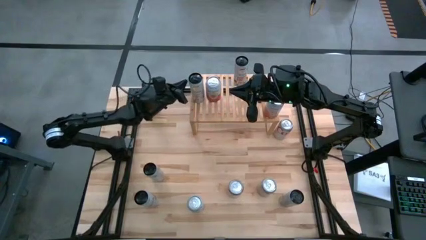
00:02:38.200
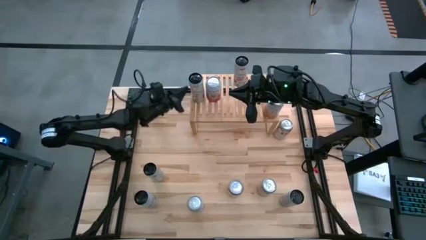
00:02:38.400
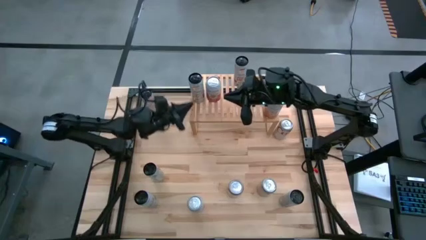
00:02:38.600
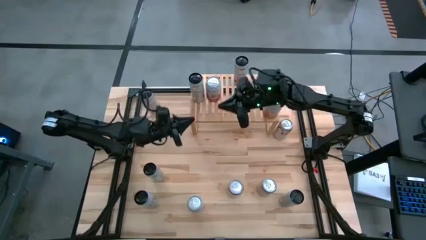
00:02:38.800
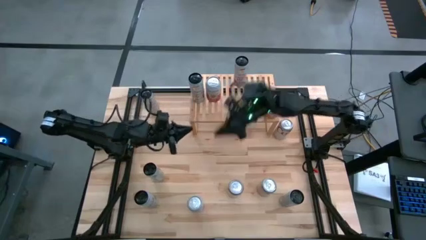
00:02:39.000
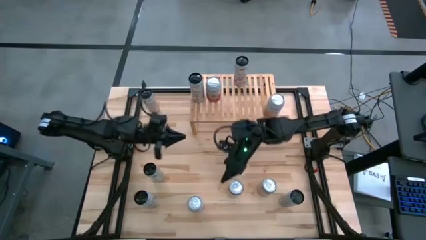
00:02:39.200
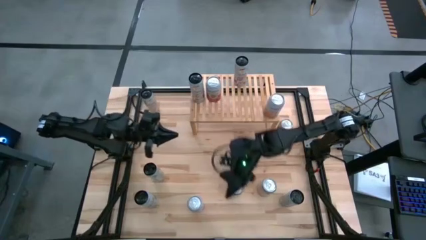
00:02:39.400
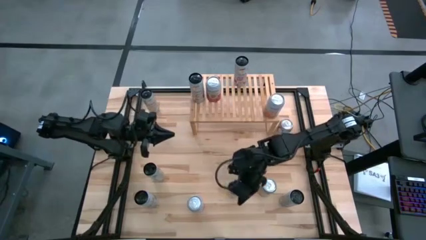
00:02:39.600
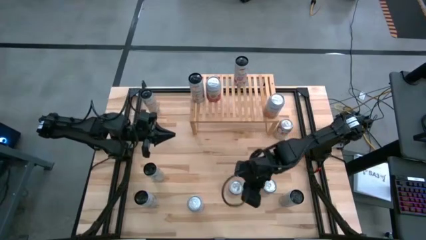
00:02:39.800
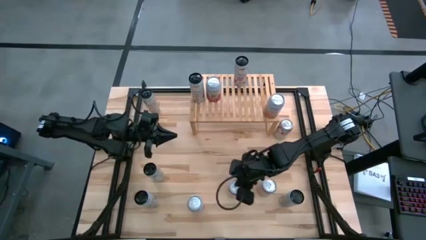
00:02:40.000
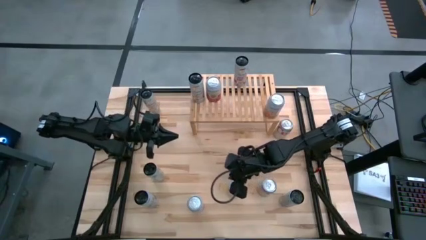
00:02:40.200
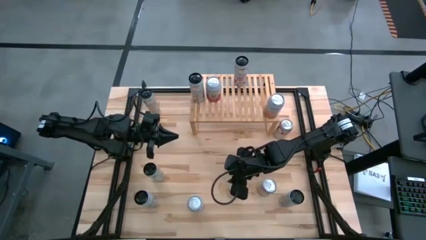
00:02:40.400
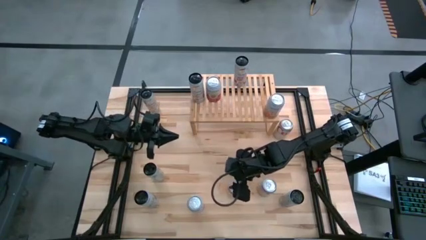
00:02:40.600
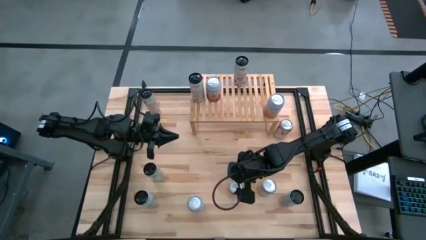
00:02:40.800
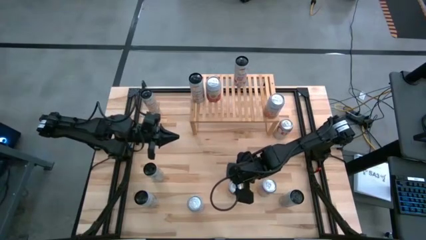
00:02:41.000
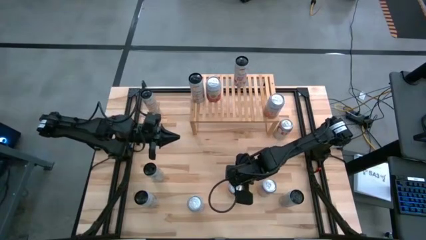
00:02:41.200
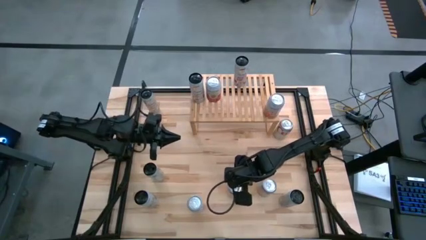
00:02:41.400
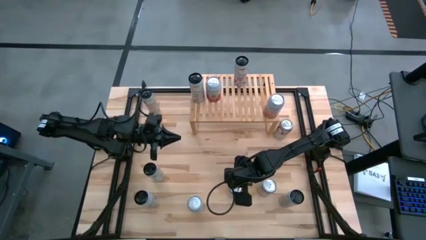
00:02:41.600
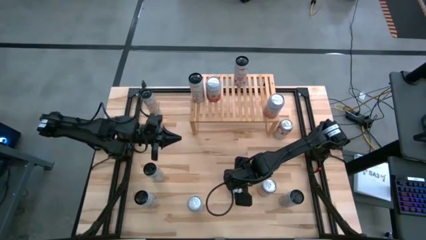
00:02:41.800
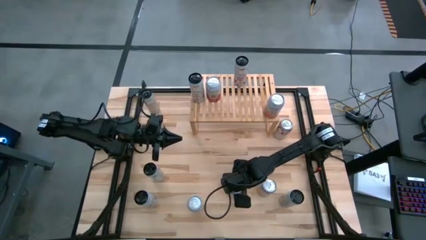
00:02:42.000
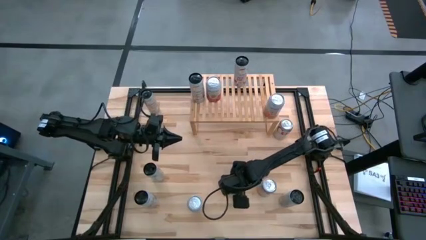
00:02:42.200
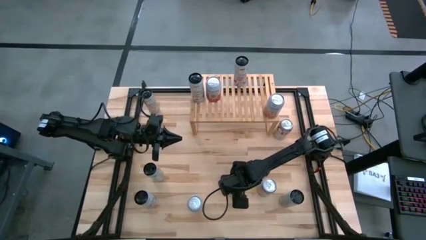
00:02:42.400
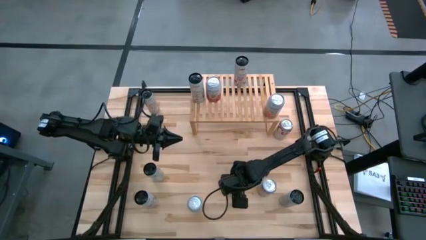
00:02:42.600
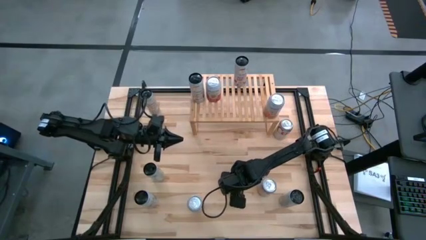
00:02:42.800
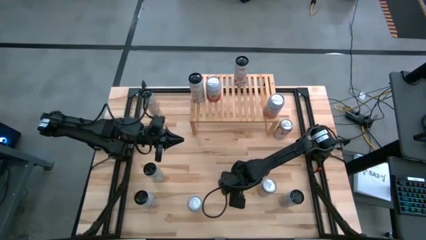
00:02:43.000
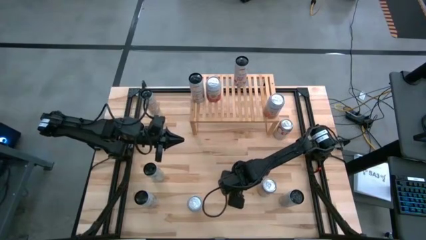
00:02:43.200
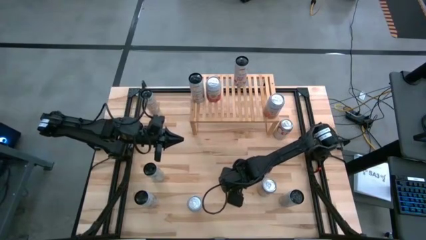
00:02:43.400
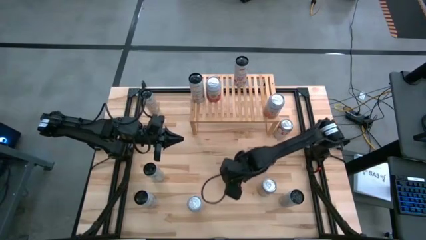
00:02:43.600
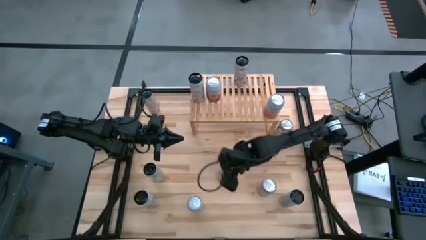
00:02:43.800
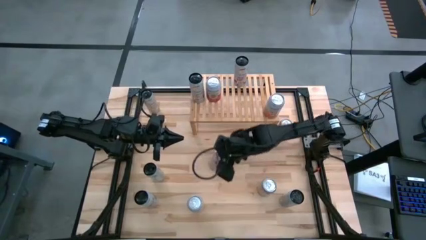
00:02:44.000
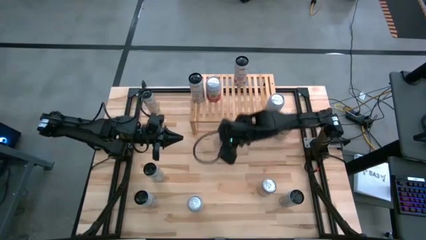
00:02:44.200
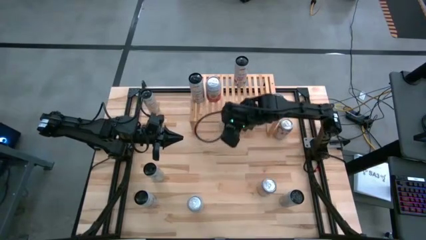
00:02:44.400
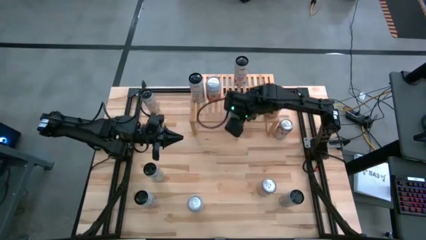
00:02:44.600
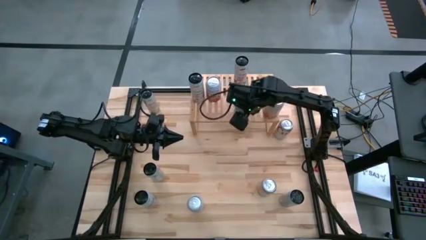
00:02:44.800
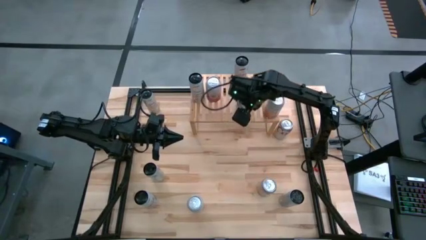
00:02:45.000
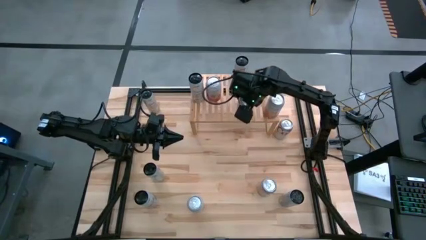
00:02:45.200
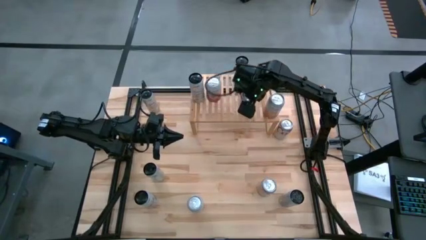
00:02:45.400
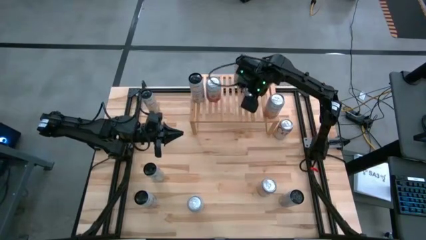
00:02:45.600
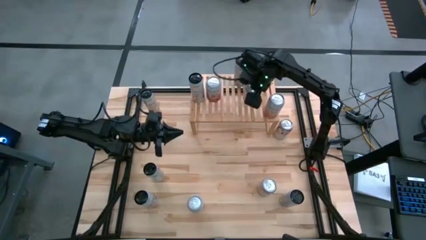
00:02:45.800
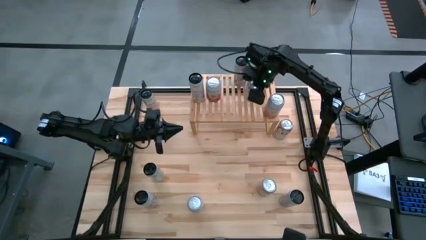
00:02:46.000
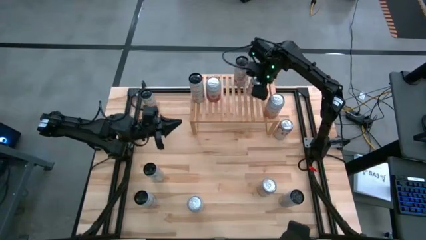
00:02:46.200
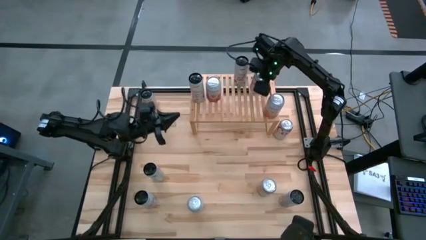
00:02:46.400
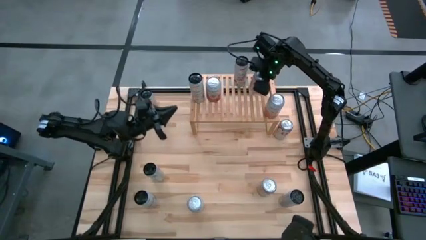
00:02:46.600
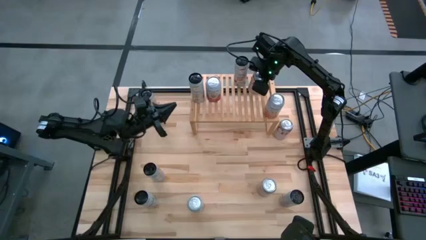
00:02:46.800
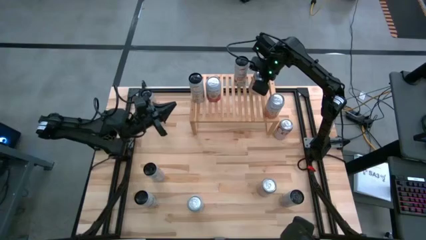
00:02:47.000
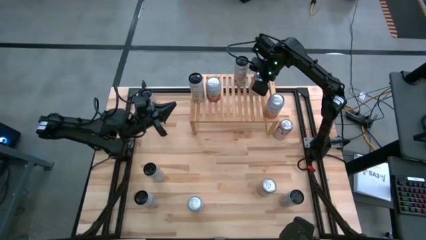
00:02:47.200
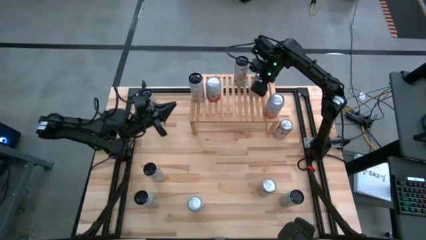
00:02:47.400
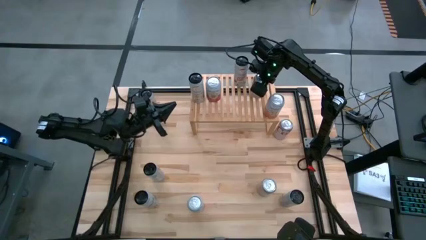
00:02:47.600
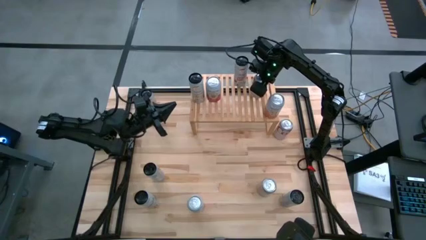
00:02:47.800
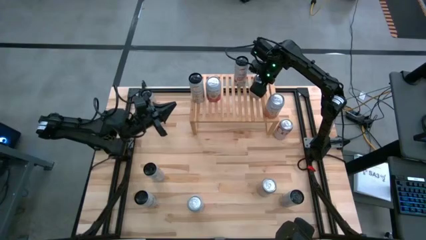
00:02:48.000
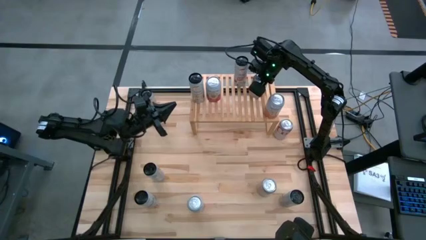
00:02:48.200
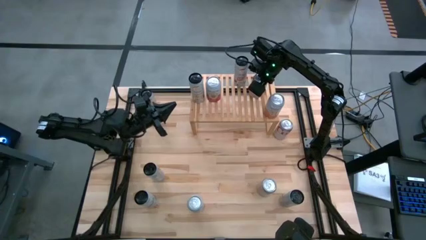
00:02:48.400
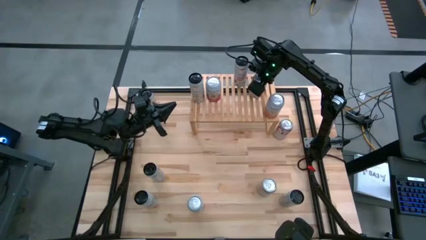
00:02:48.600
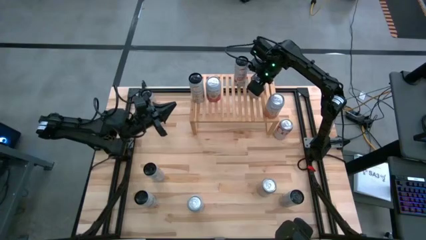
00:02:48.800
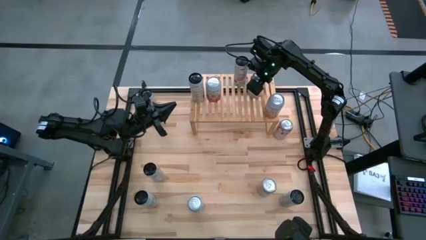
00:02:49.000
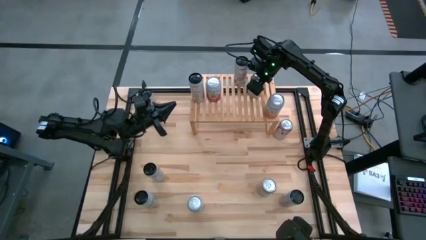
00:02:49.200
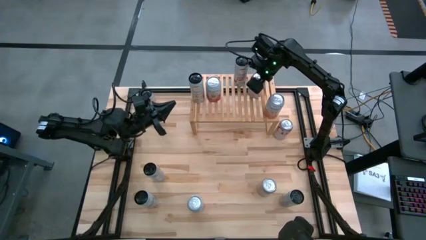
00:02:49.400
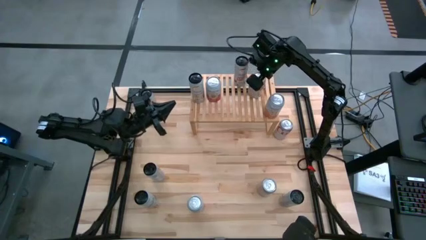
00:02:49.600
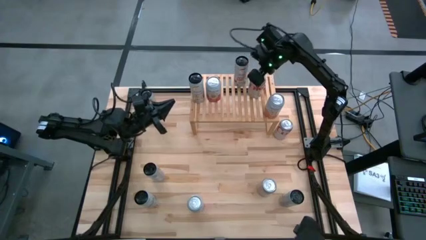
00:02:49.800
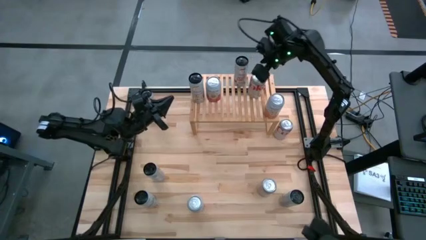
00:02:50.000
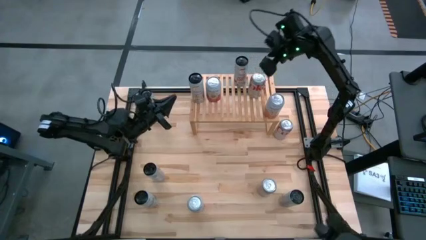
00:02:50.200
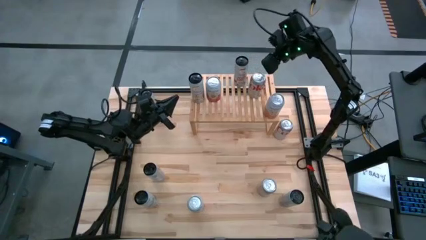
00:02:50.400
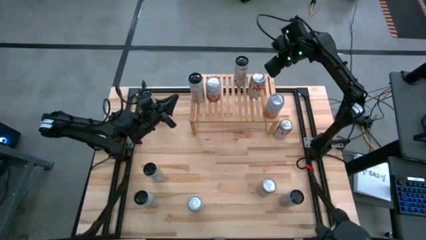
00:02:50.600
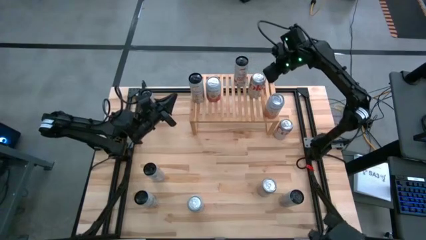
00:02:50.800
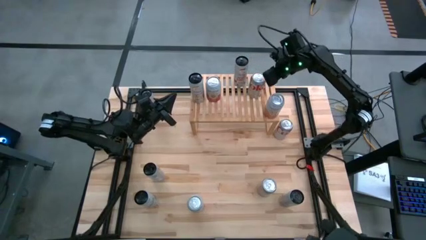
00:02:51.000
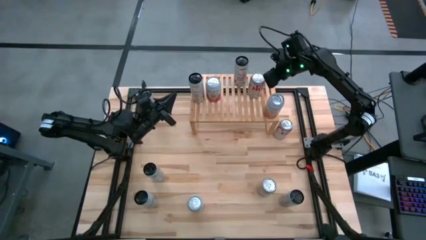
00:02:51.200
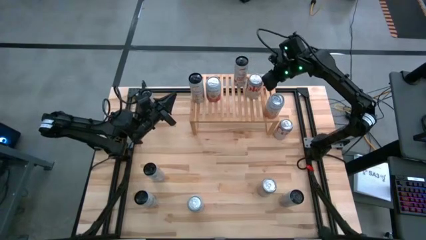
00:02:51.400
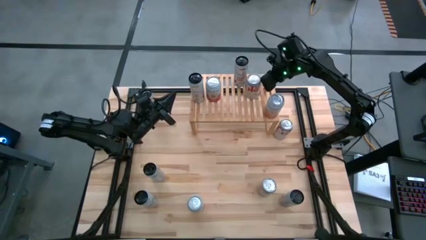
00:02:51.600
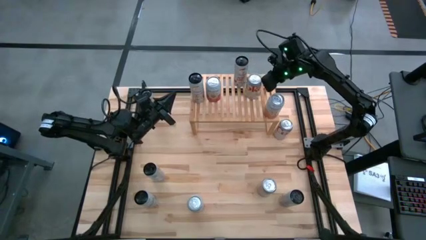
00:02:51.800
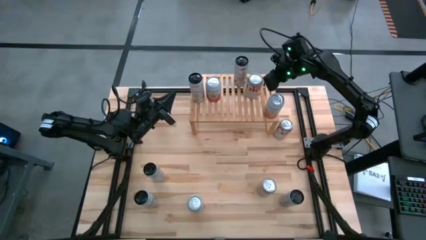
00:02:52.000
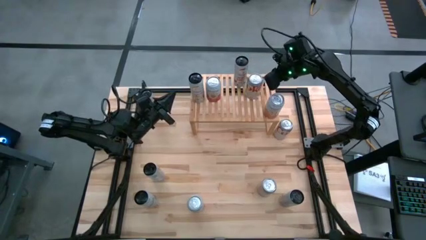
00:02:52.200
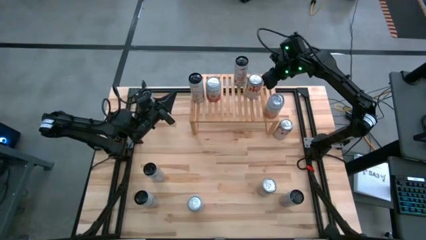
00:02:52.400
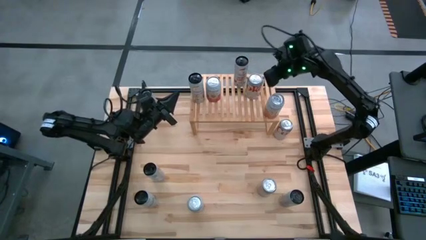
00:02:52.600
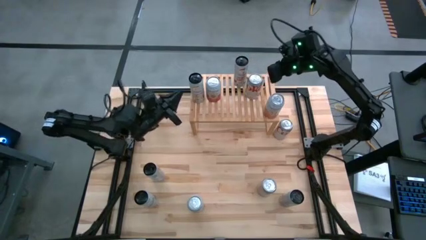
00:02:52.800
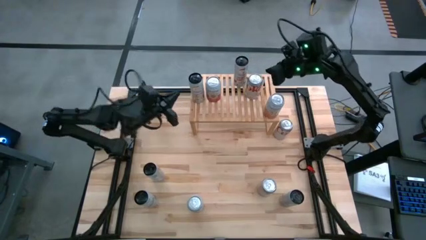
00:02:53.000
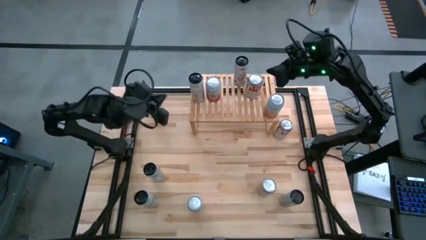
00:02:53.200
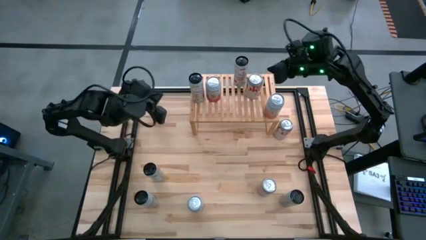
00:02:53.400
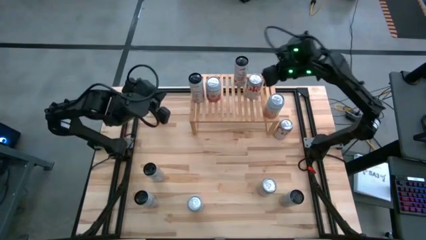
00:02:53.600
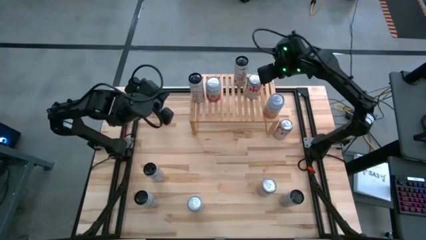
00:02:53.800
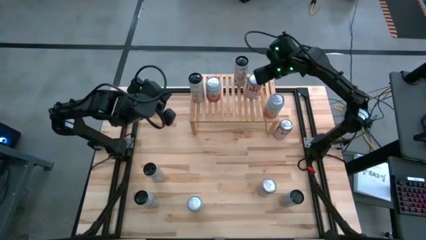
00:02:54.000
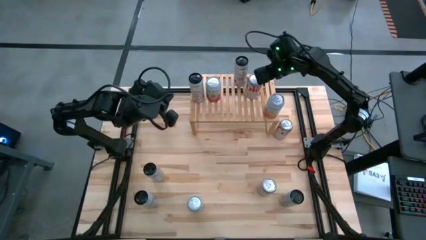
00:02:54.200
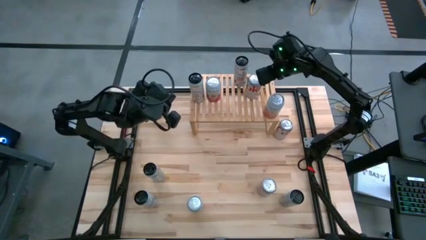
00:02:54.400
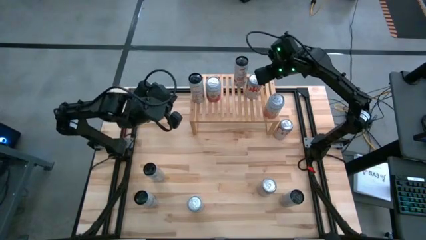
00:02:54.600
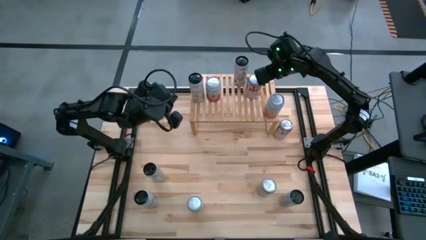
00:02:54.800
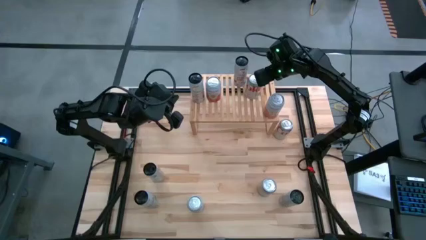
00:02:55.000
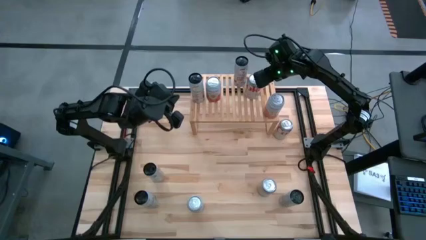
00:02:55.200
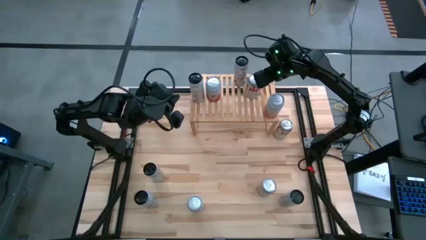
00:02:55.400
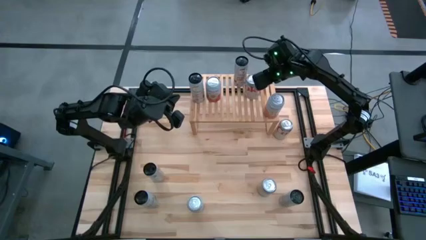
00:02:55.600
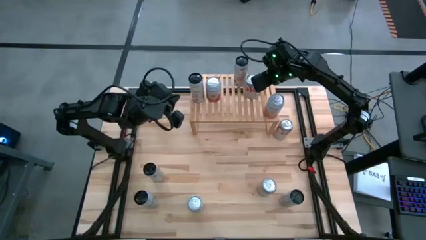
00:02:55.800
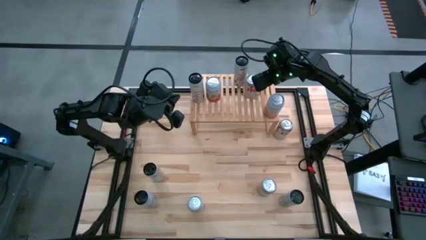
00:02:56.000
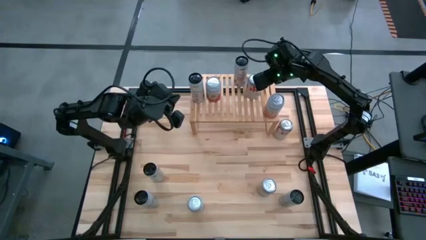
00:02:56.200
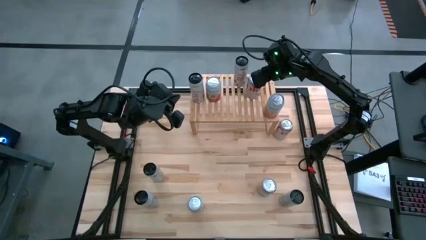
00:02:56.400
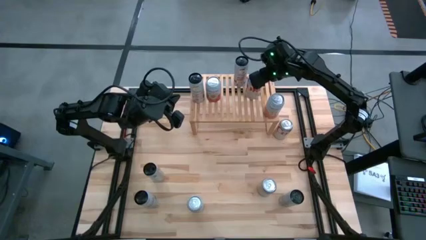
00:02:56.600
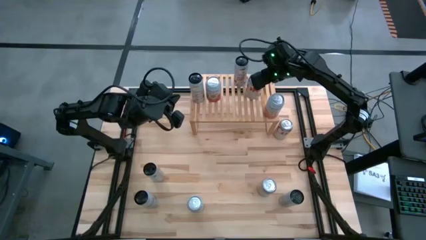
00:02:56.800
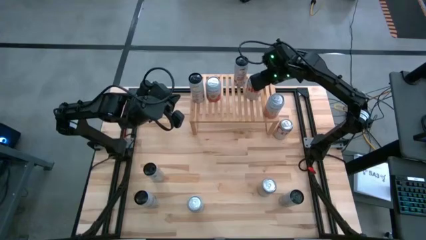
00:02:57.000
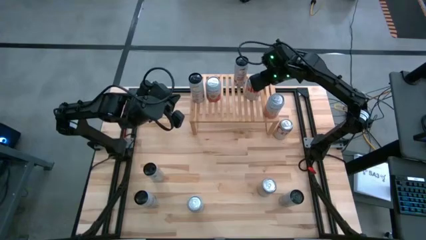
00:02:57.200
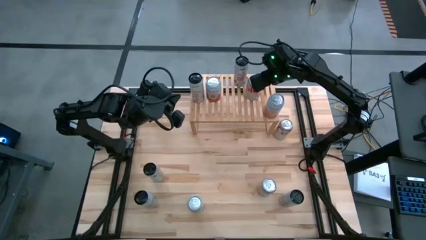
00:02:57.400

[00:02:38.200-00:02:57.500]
Task: Place canned beverage on shelf
Put the bottom center silver soda can on the shelf
